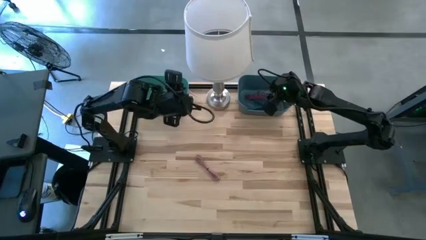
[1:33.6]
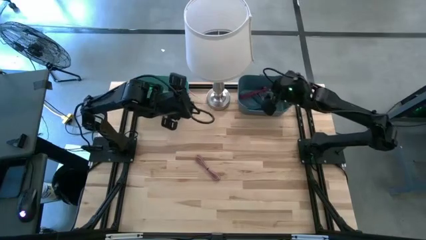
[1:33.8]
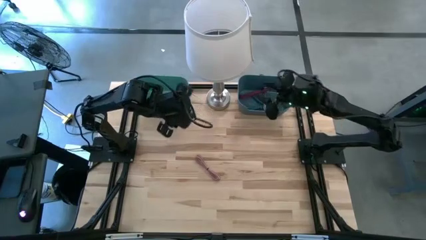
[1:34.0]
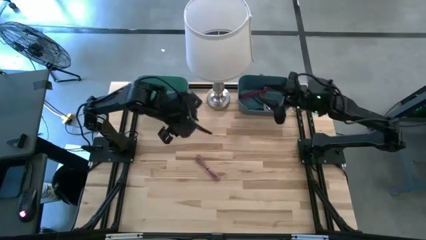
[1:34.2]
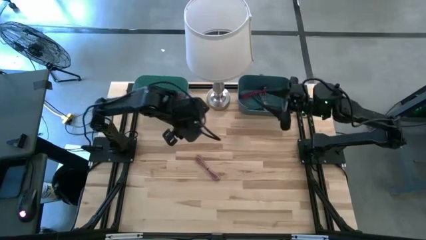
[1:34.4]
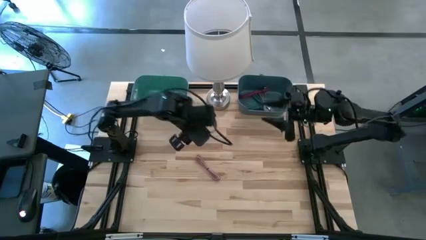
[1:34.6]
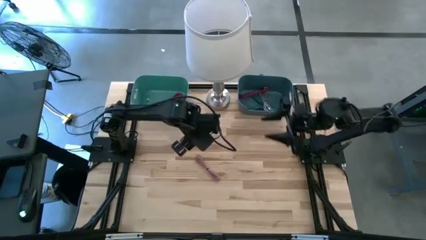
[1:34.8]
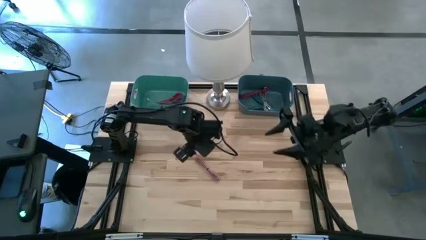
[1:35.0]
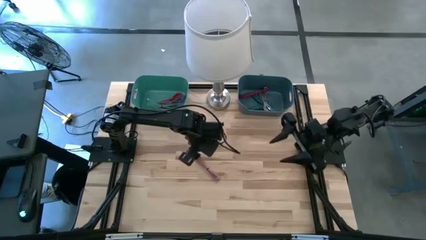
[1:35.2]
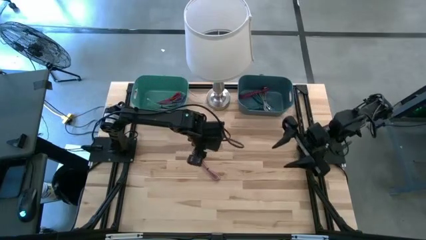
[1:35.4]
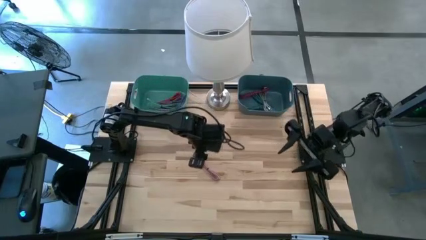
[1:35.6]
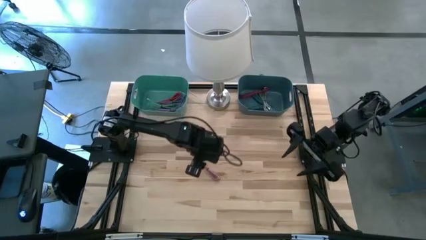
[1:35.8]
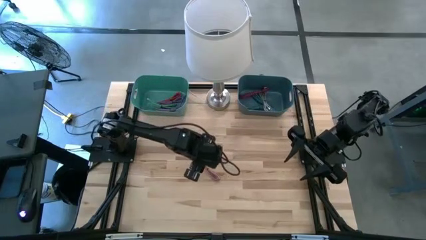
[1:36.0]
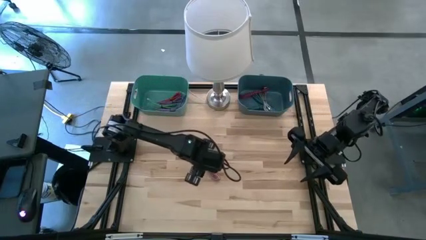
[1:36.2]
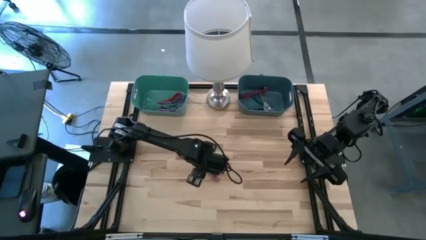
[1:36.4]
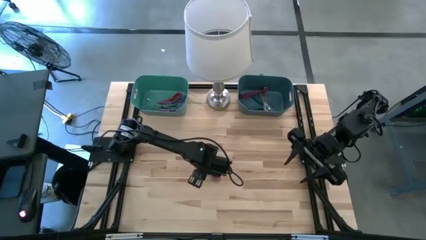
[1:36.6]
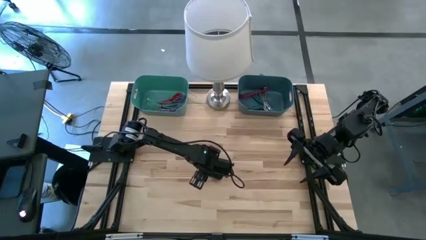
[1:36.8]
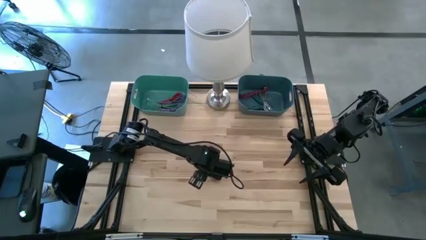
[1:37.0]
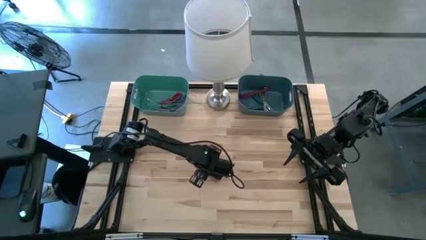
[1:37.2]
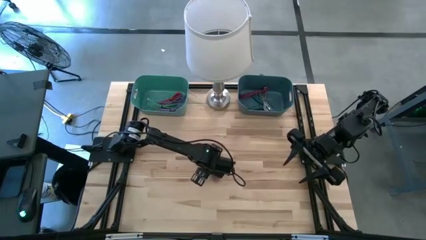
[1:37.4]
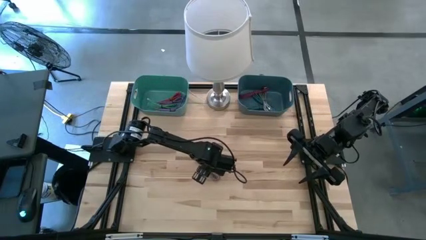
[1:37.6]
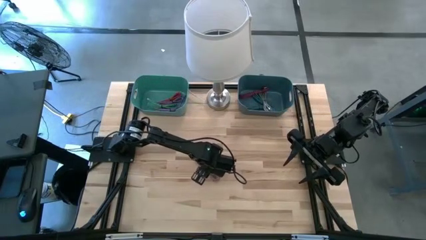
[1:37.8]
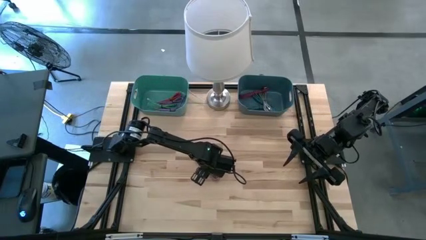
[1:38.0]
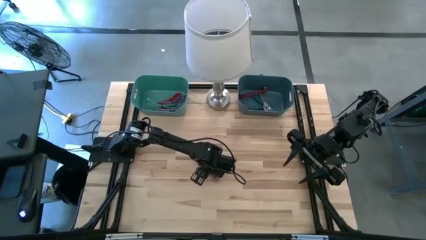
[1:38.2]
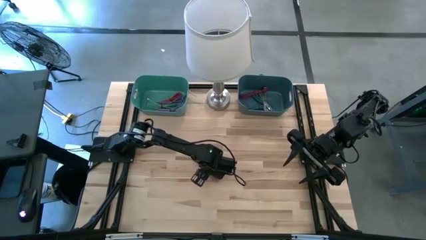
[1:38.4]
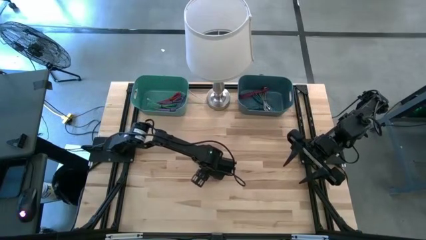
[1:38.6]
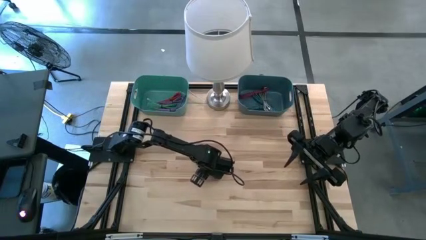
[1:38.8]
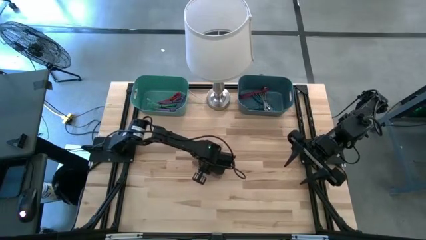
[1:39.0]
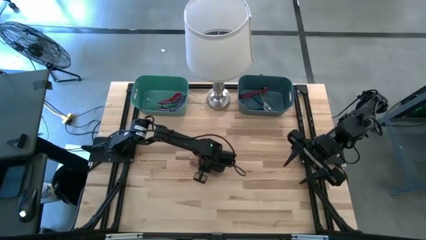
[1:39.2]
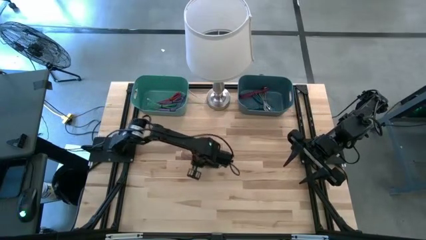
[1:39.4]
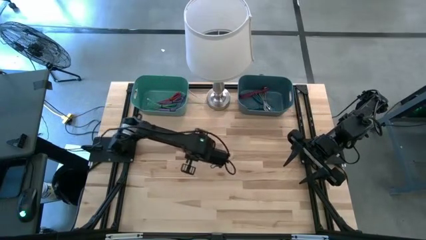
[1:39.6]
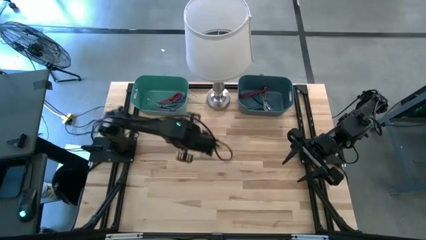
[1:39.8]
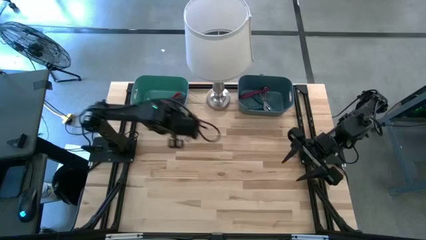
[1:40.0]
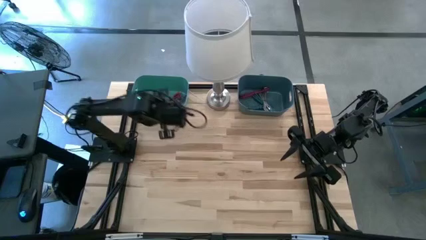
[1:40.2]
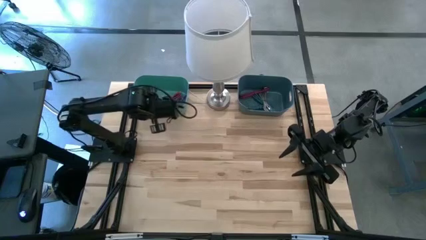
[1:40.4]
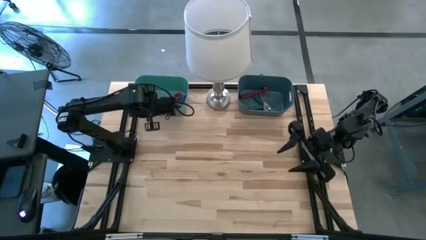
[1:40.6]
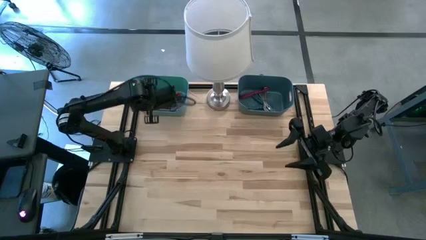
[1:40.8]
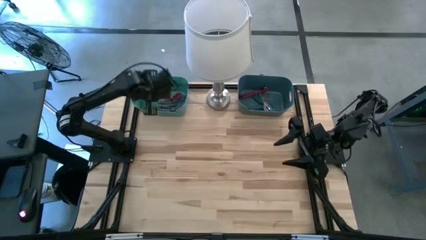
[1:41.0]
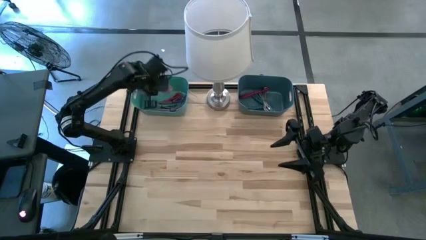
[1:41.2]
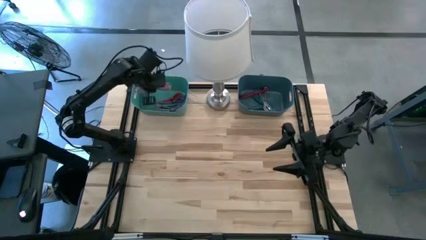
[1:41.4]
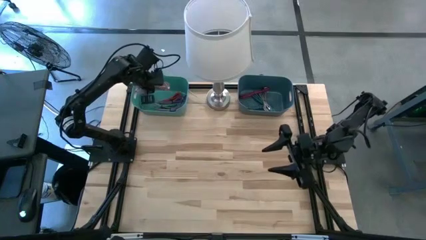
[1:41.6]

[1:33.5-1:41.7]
Task: Pick & Place USB Port
Put the light pink charger cable into the green bin

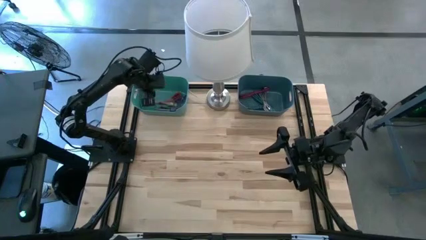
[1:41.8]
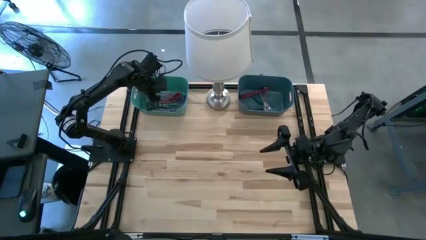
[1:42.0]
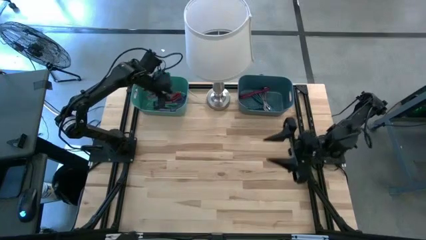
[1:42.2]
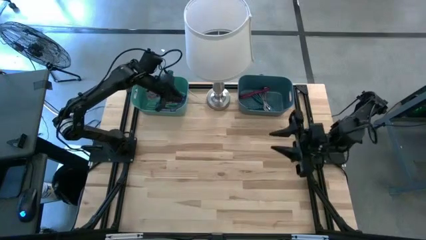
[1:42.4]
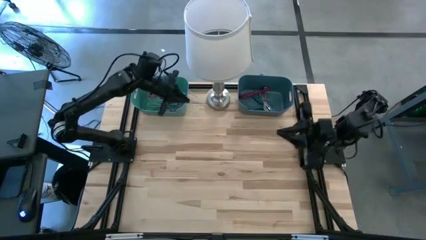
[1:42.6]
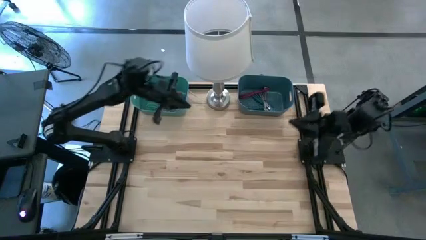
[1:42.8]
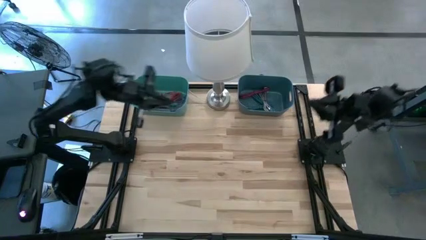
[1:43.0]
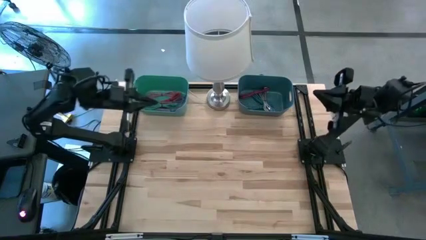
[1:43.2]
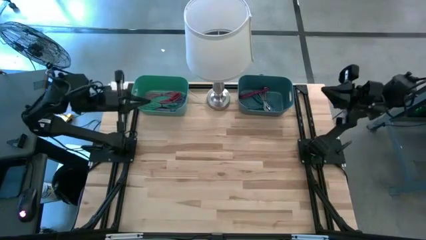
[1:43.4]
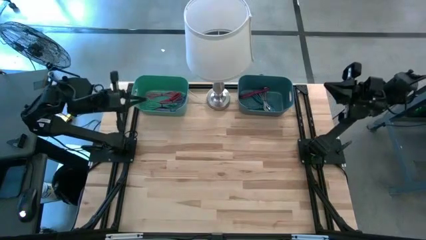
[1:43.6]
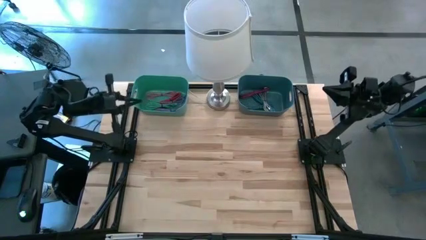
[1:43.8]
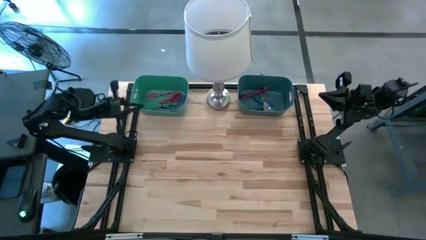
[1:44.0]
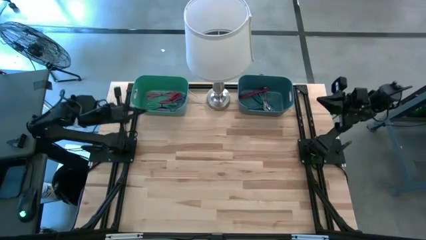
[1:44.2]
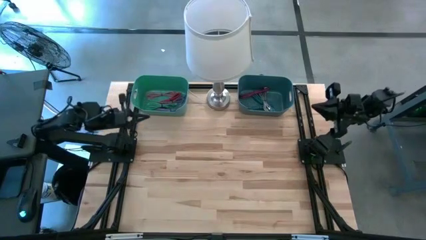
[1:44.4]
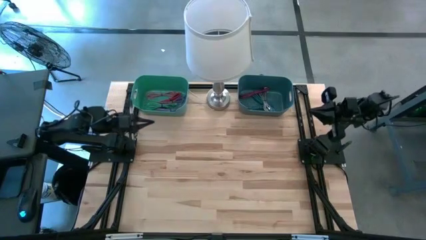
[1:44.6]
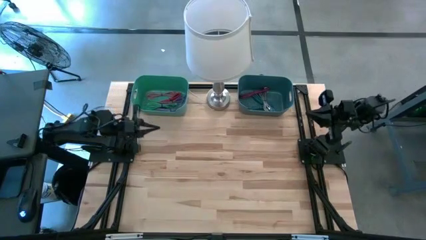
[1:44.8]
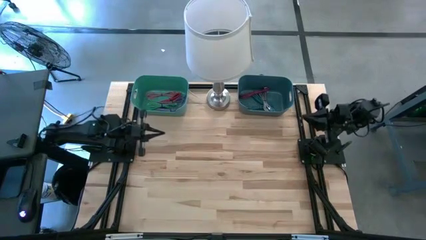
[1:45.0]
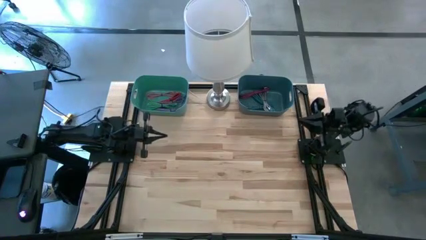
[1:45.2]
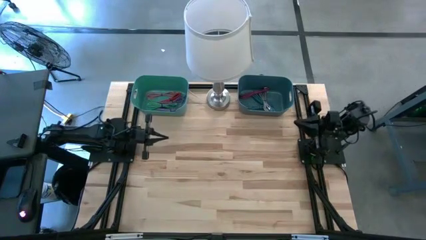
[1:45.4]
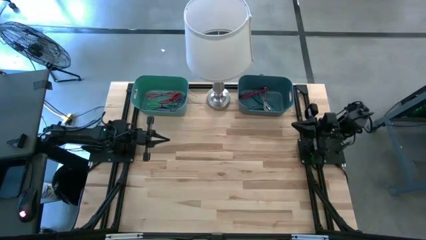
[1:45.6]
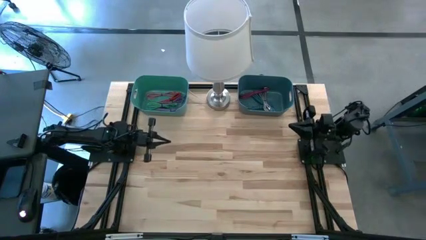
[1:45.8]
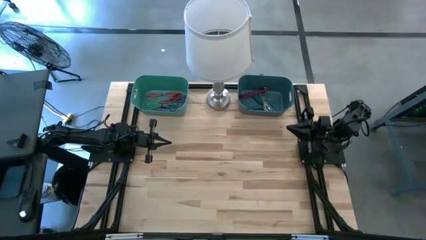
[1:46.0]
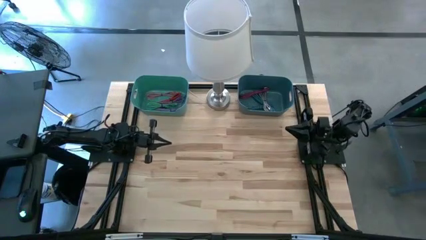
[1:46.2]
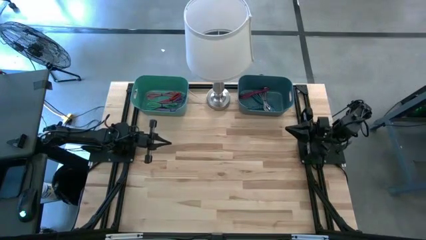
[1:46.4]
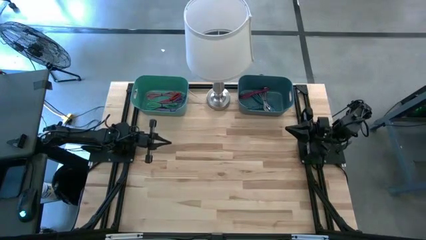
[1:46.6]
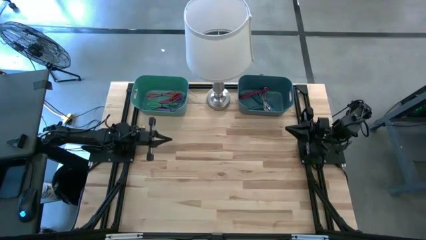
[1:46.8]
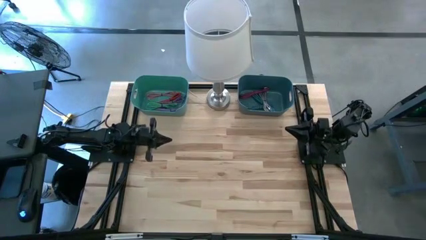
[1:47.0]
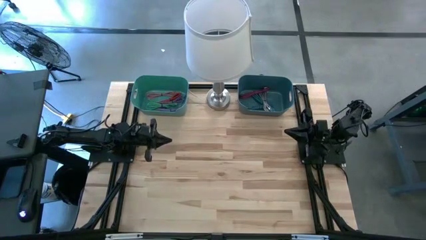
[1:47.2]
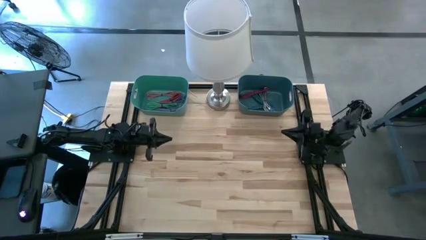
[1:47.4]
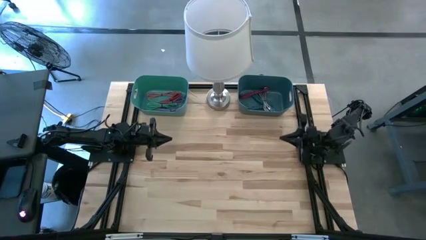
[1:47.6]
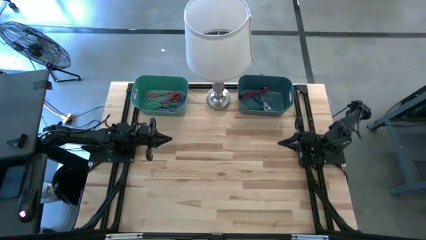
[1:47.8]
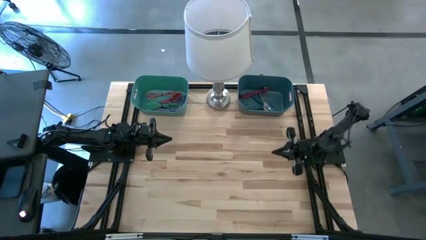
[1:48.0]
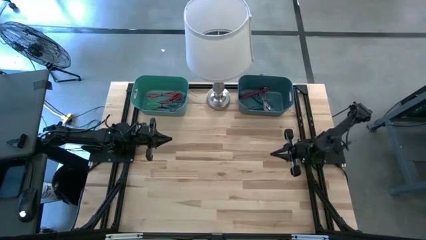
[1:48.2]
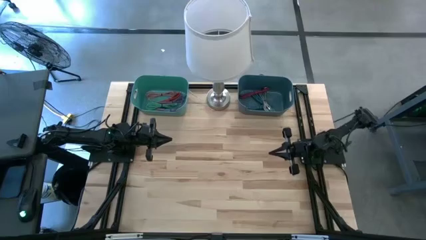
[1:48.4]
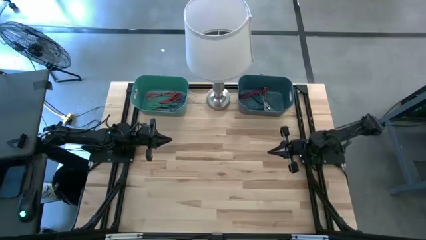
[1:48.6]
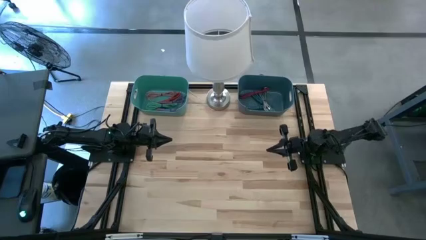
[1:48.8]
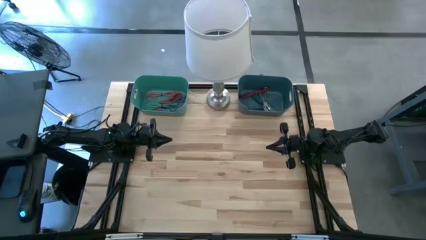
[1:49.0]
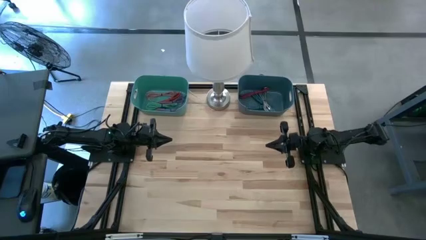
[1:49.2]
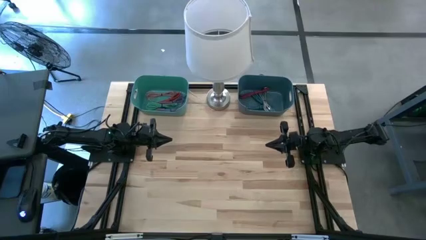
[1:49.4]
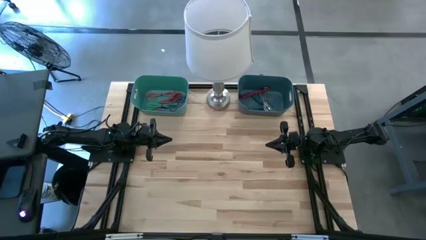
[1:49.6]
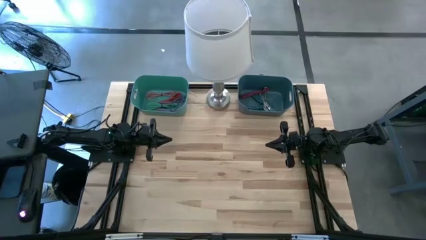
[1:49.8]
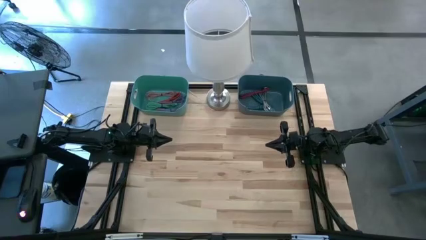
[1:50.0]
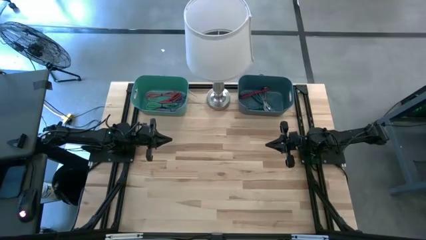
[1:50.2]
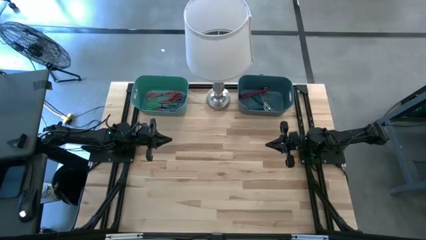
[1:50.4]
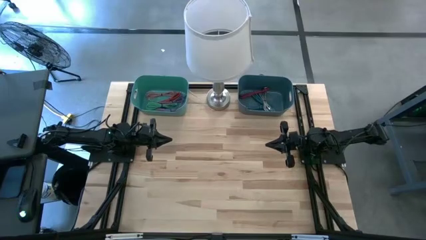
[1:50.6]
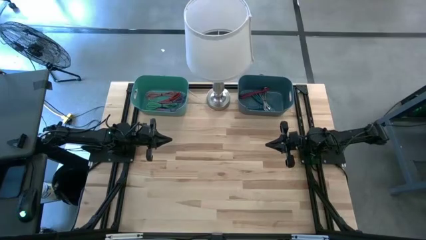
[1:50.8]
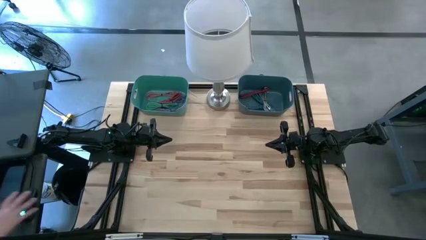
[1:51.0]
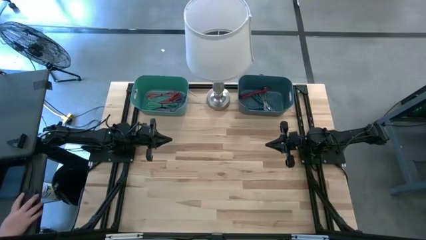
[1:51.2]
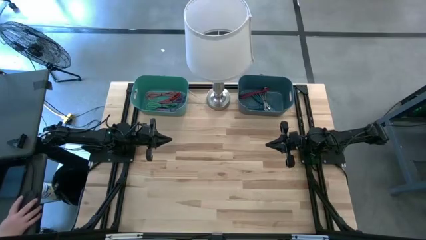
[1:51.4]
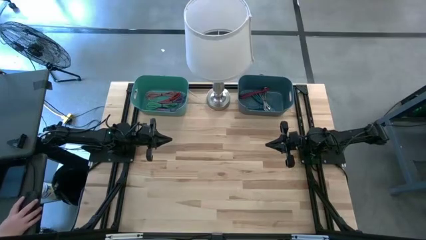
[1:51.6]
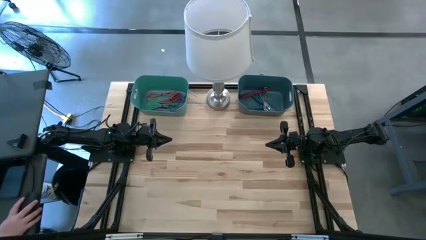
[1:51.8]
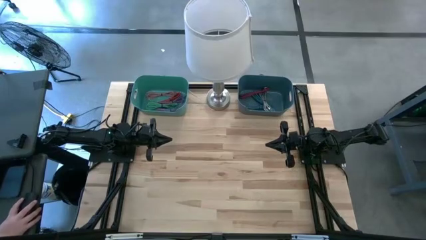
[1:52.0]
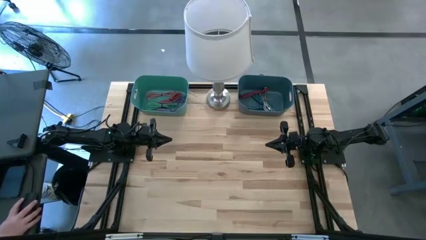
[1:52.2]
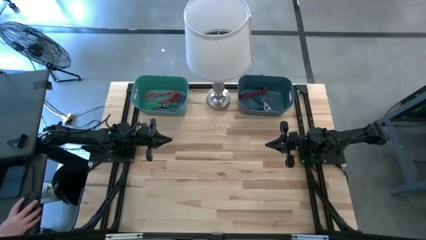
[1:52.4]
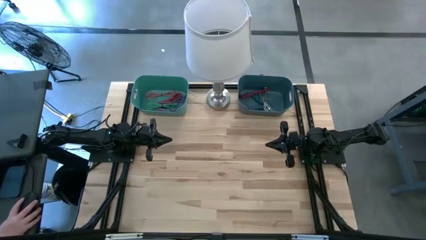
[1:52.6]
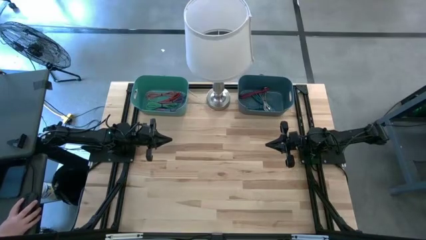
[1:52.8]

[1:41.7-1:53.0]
Return to Home Position
